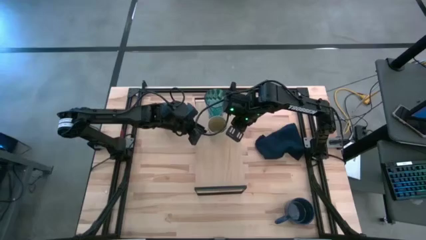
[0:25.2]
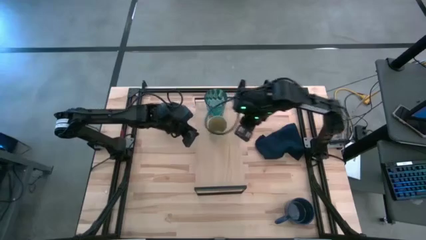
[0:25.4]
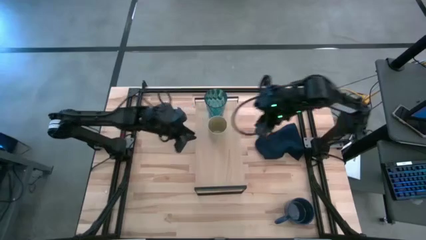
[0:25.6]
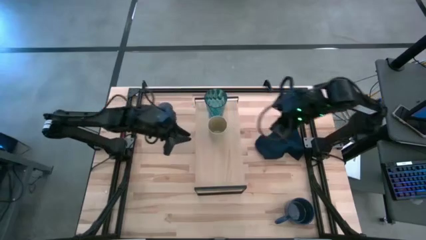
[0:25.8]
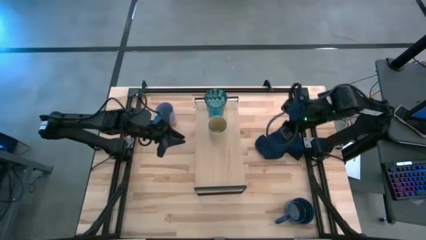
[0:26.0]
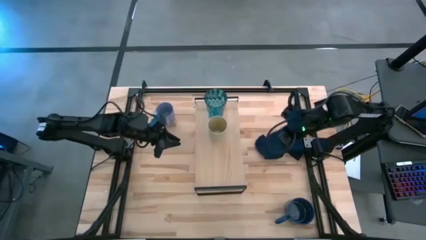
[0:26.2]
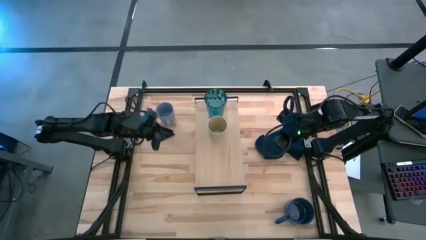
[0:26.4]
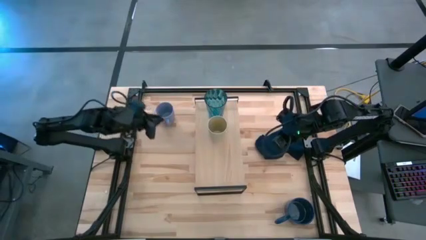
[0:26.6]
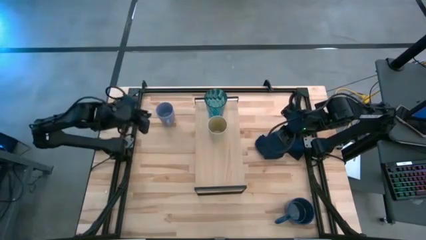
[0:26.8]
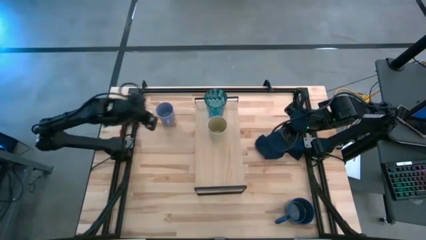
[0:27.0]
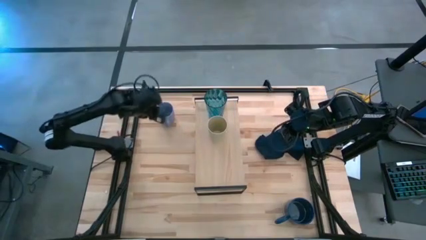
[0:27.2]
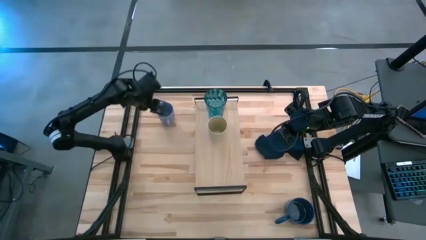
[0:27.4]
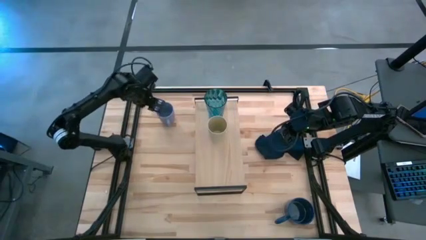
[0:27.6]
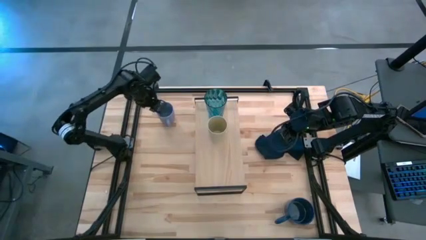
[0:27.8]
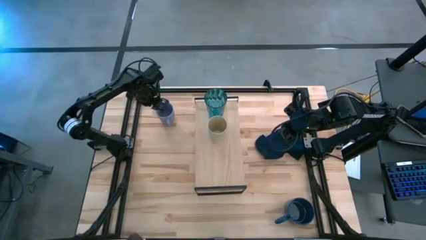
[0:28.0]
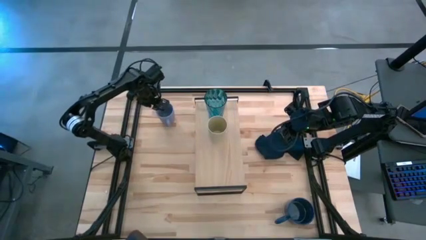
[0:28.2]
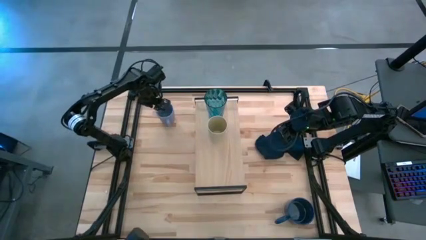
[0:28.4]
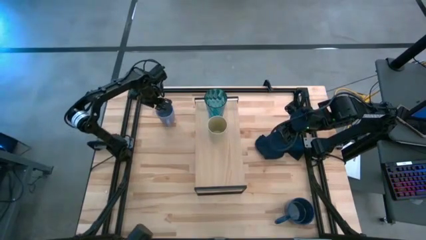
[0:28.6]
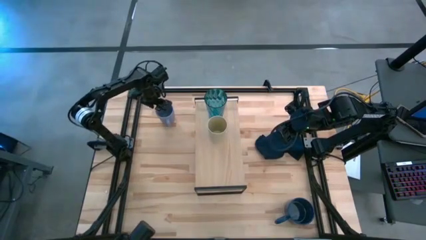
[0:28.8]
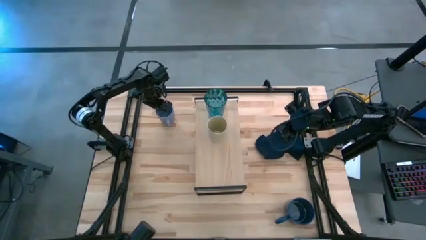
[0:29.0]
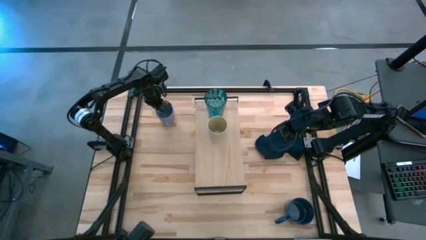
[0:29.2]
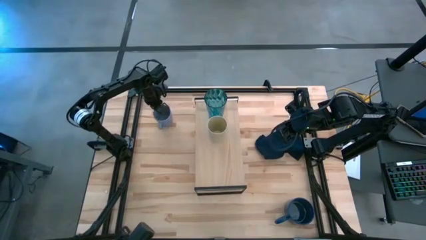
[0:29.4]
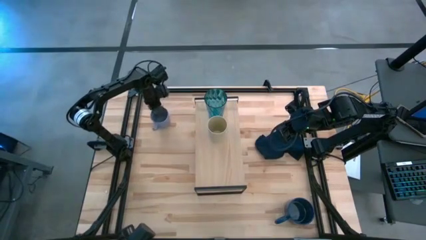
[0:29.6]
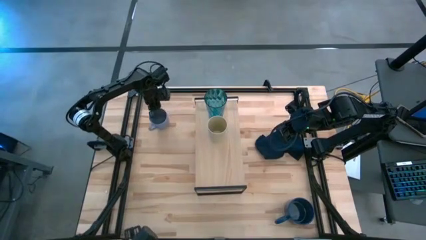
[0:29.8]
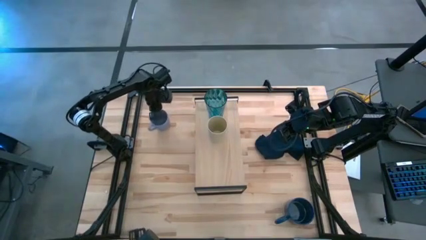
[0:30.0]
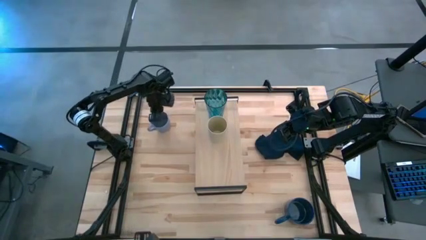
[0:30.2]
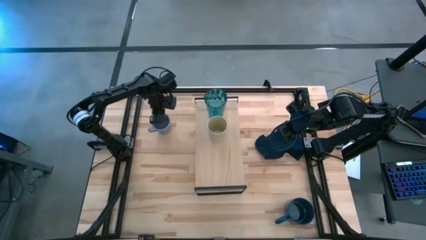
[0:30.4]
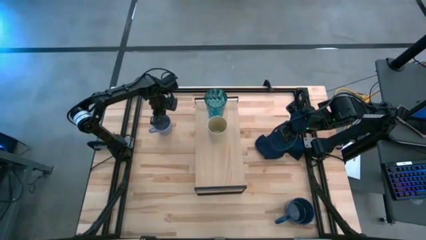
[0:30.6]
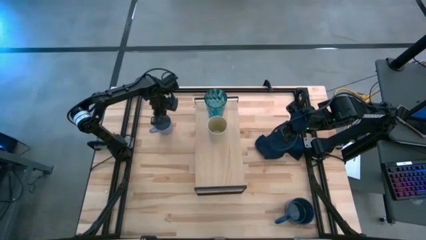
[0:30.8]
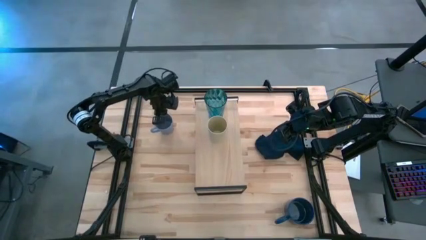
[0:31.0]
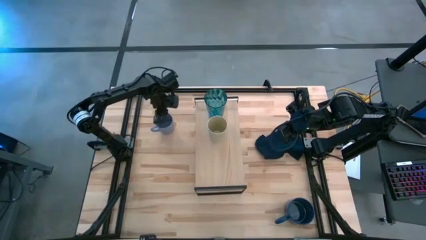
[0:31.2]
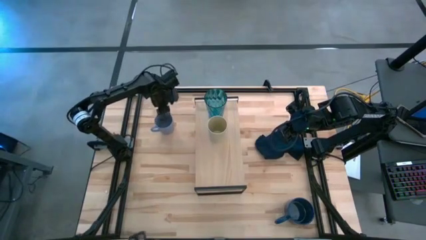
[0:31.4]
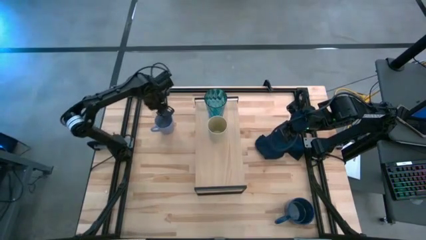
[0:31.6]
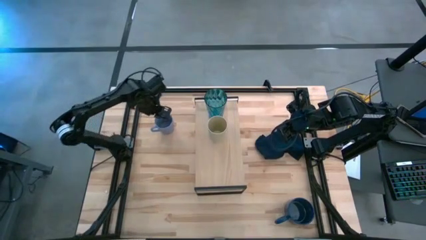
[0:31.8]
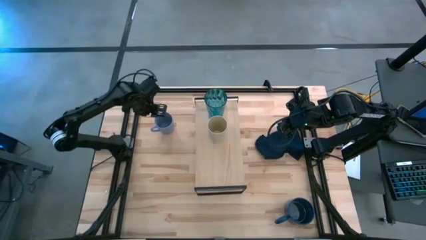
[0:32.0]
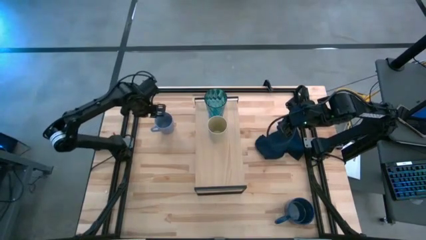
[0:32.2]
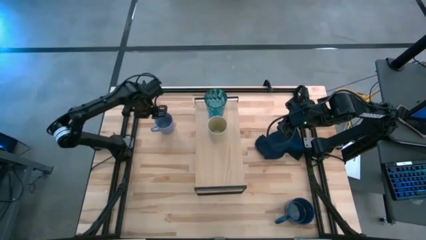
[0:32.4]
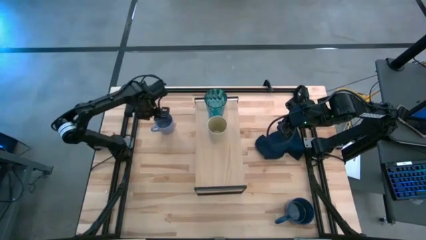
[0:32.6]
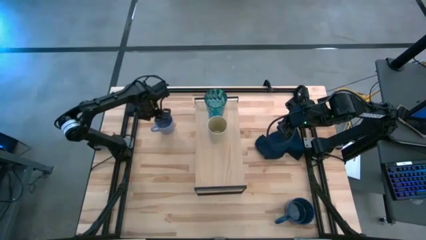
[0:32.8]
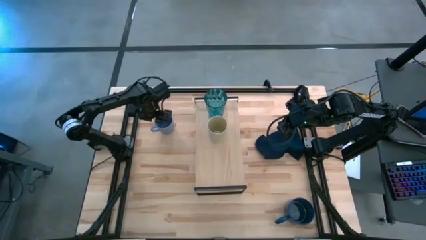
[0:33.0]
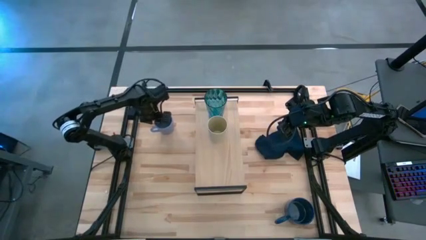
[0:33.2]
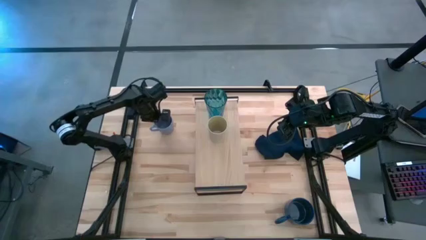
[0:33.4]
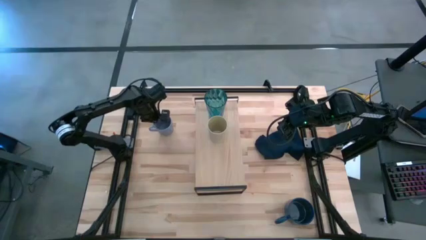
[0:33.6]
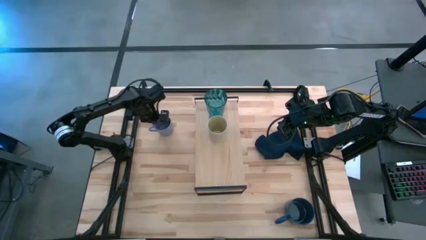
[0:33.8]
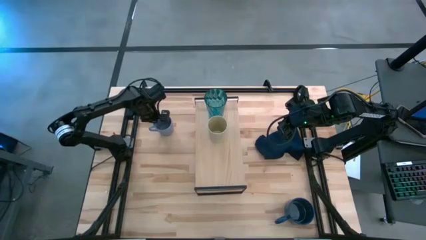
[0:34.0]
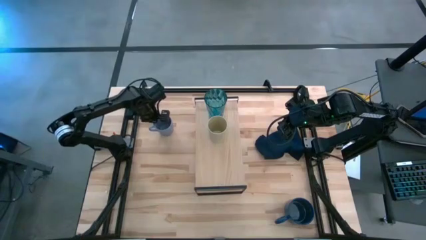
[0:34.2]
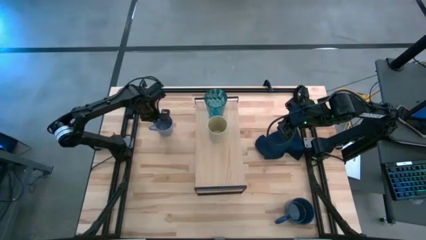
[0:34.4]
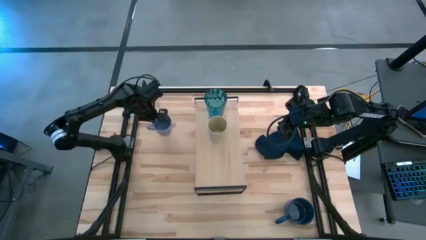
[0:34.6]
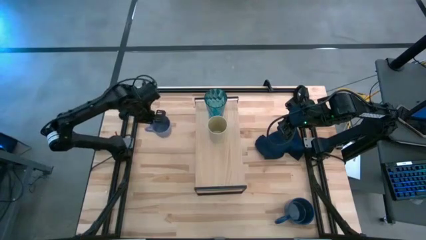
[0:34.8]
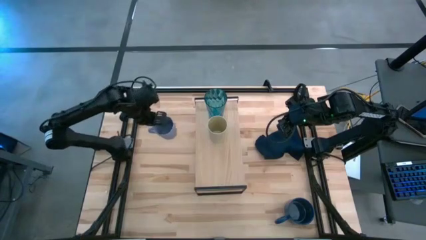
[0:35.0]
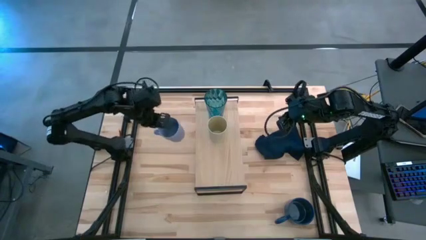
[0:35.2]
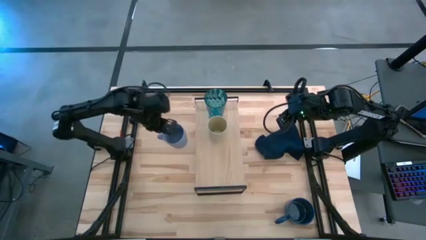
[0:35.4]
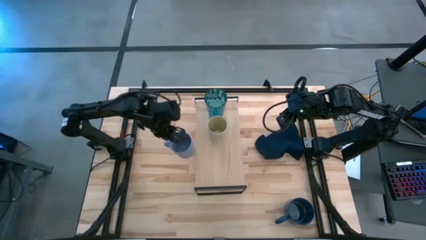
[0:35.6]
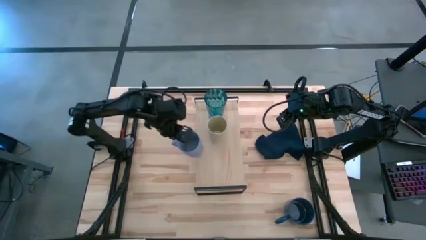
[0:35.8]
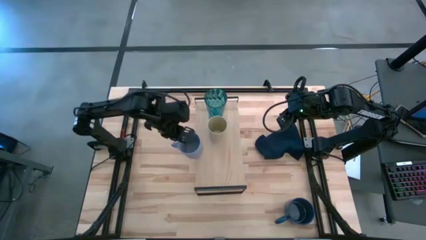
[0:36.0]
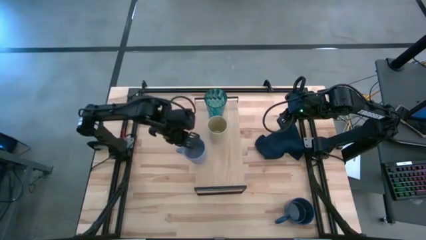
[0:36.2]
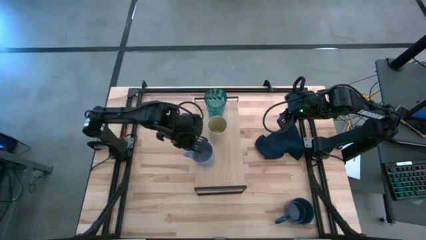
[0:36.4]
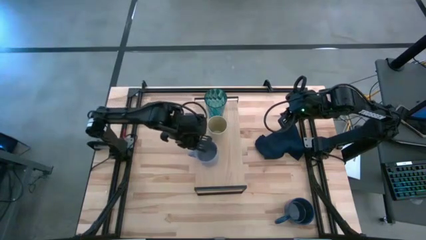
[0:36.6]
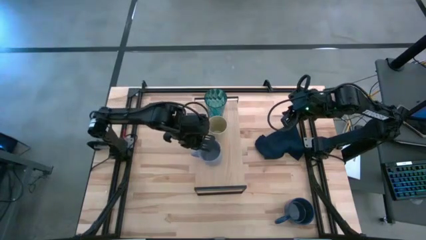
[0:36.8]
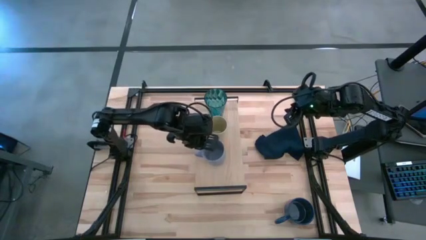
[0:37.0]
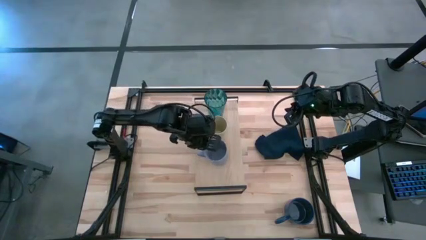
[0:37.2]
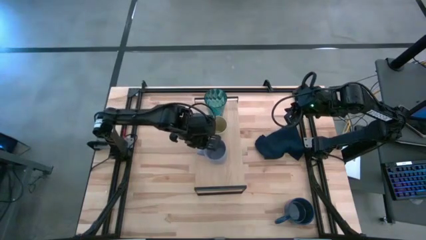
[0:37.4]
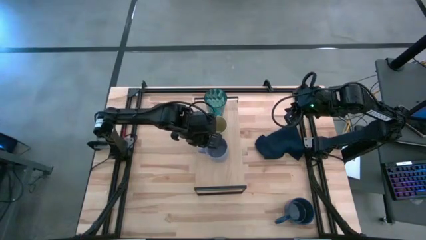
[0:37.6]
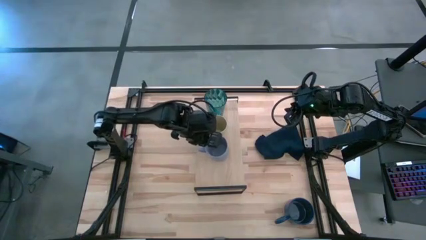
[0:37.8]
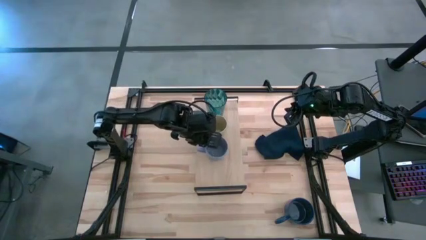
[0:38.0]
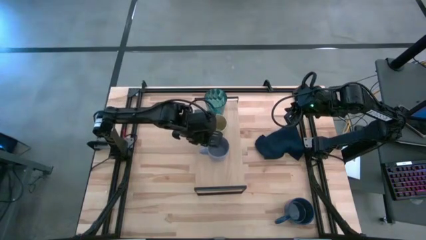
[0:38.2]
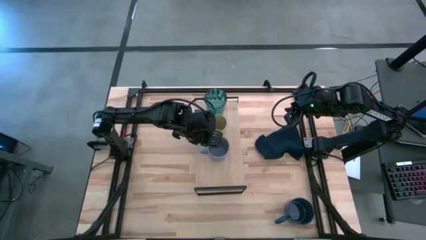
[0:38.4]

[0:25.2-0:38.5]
Task: Stack small to large cups/mugs on shelf
Put the light blue mug on the shelf

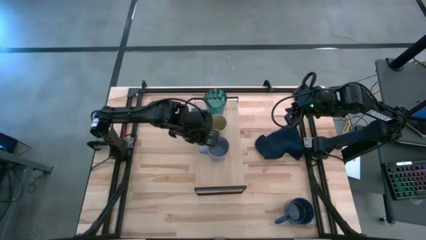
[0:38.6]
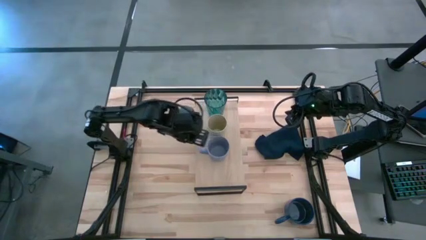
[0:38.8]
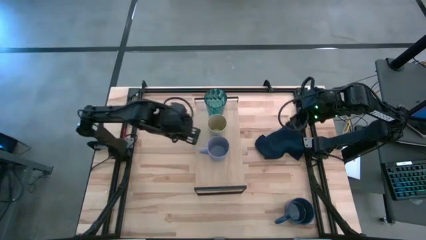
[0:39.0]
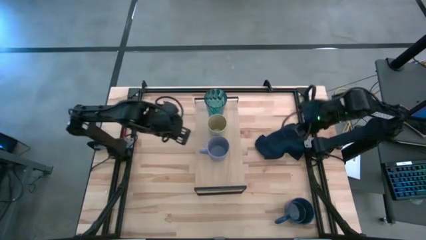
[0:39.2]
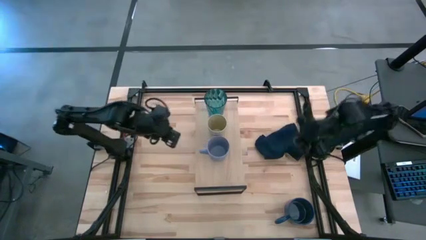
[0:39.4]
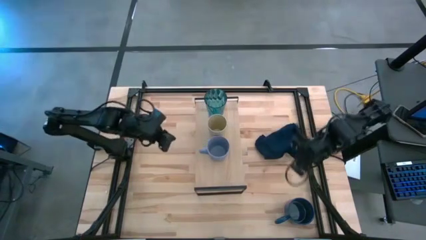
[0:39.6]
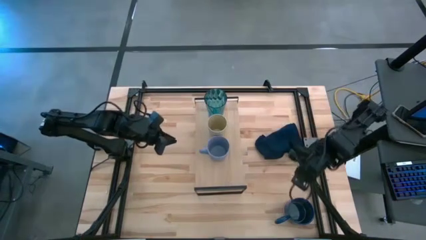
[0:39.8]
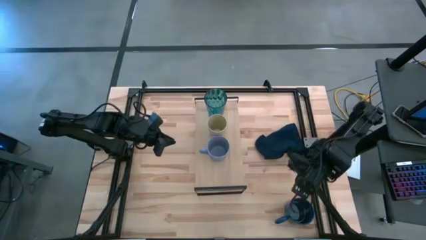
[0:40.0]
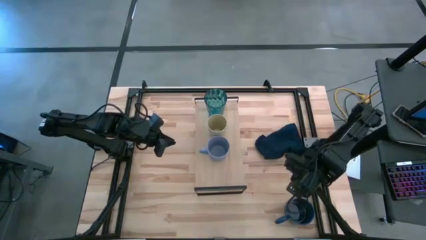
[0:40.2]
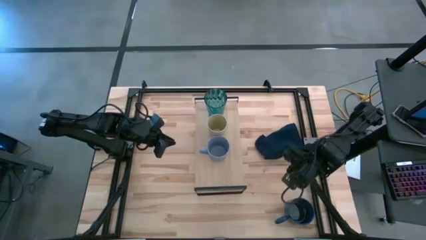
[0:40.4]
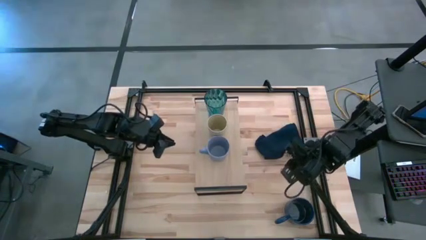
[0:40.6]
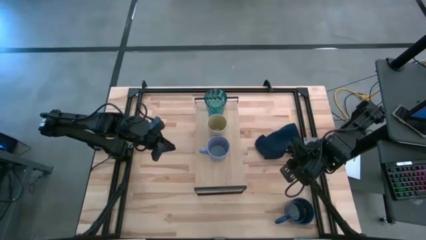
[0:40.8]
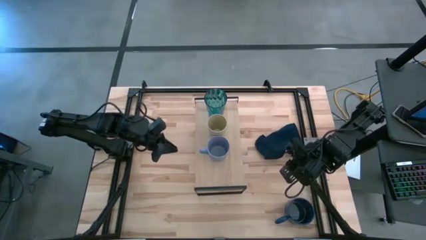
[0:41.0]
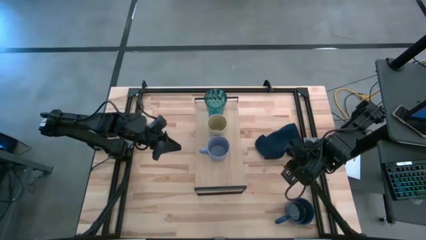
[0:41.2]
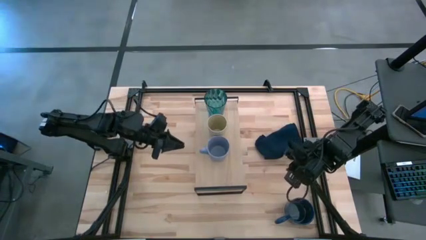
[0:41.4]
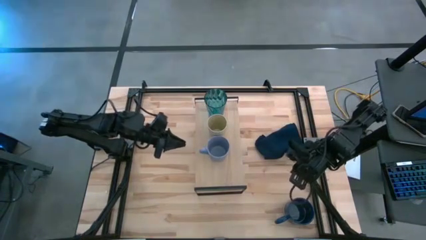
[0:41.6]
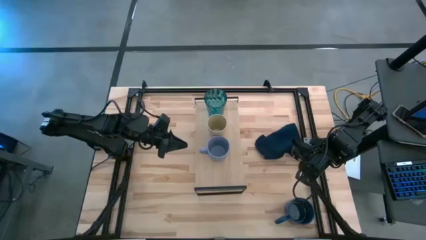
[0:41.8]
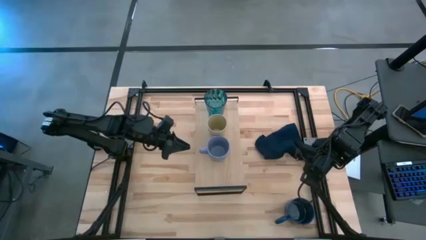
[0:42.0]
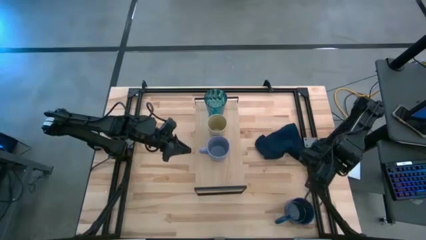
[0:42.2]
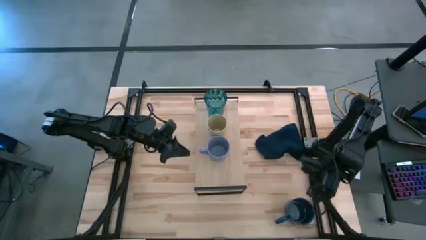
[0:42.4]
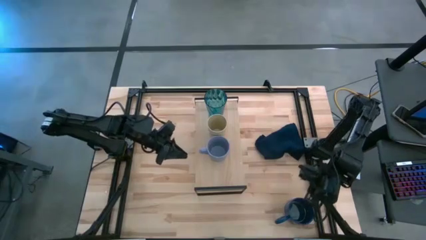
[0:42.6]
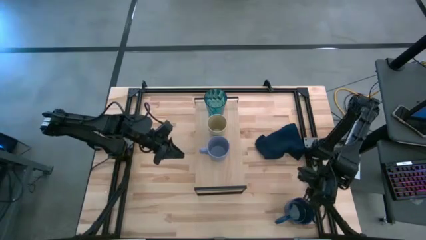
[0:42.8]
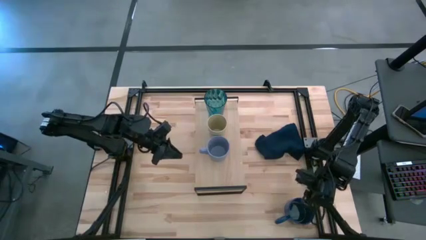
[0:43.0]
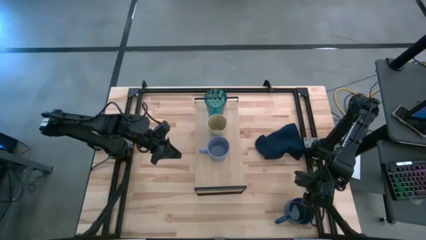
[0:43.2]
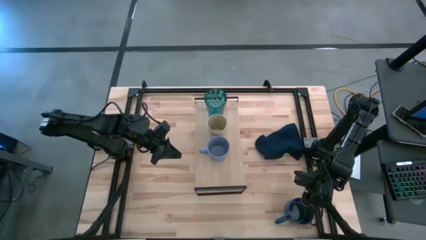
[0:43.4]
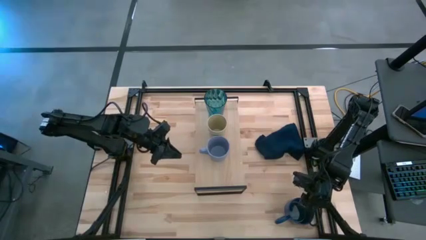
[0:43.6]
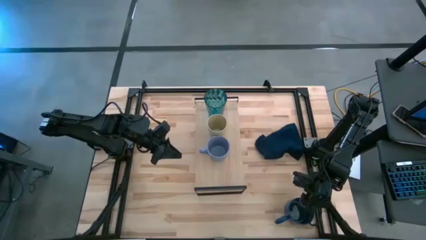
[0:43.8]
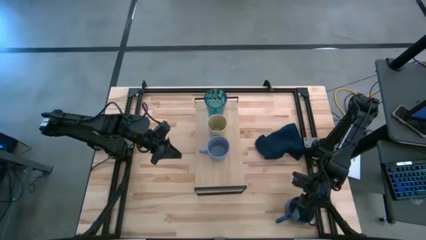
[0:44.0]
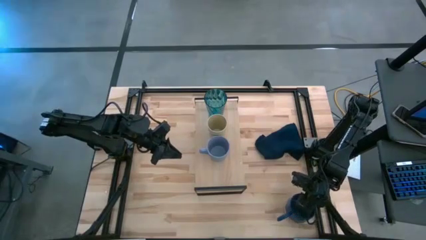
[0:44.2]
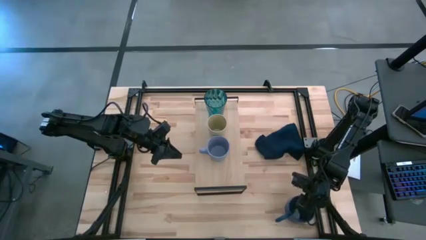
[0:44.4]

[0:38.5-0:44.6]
Put the dark blue mug on the shelf
